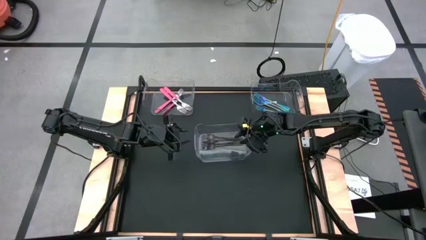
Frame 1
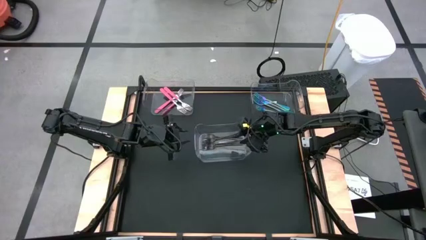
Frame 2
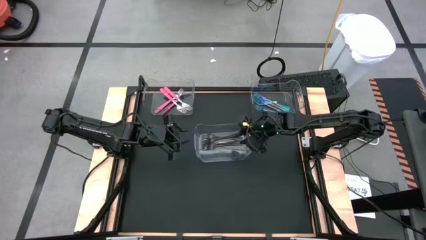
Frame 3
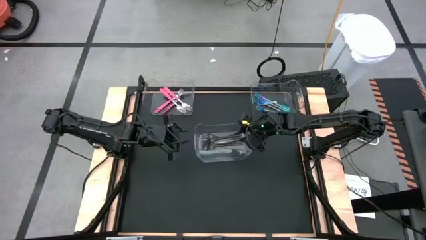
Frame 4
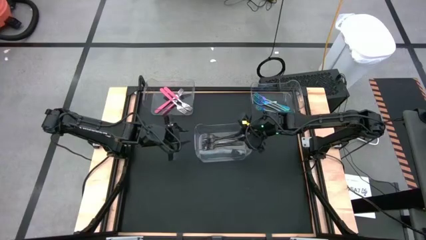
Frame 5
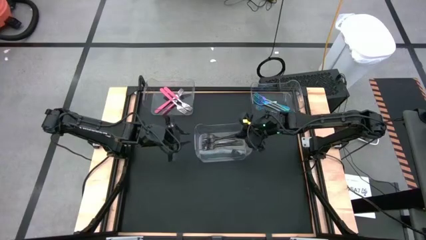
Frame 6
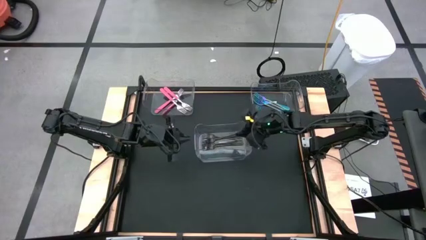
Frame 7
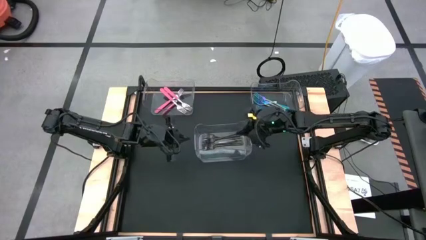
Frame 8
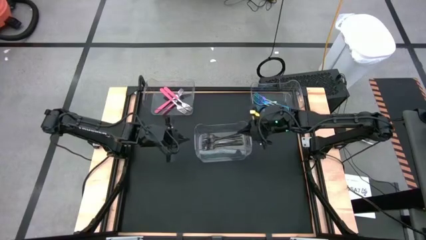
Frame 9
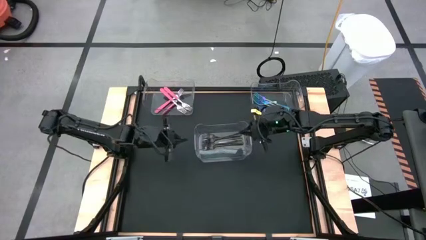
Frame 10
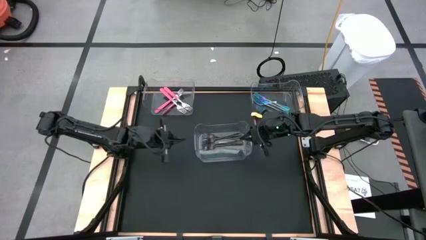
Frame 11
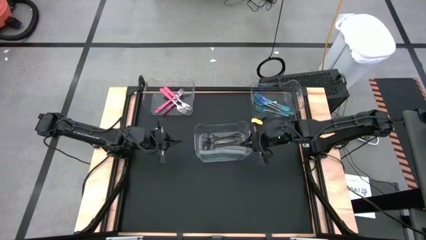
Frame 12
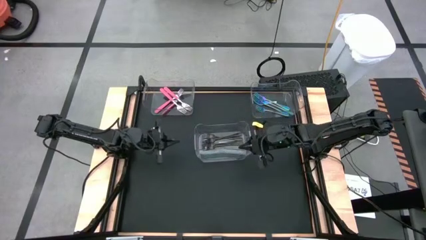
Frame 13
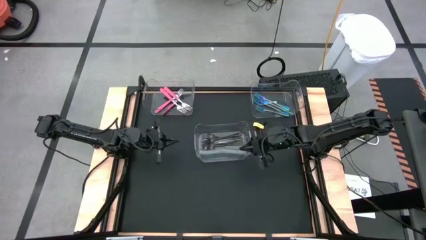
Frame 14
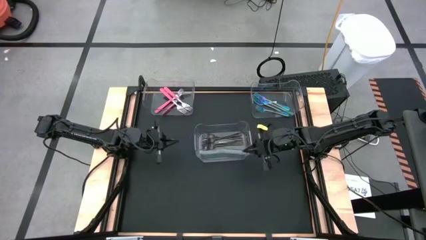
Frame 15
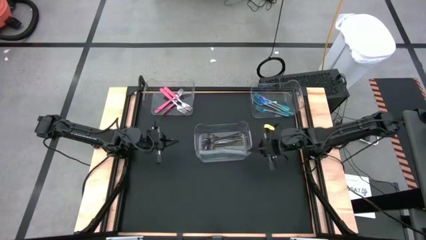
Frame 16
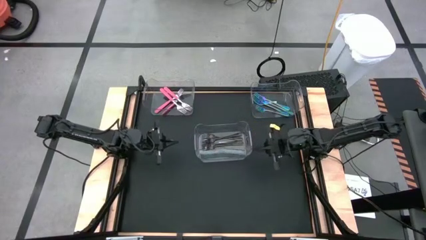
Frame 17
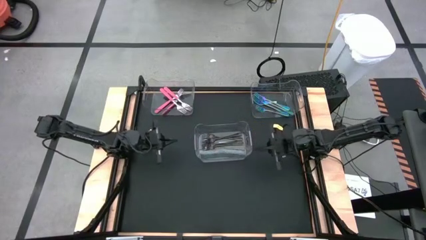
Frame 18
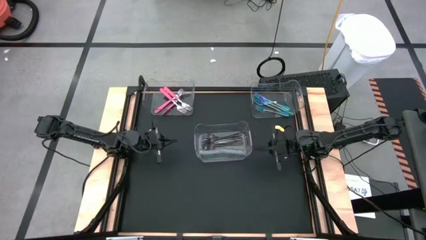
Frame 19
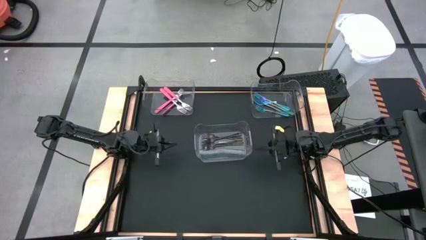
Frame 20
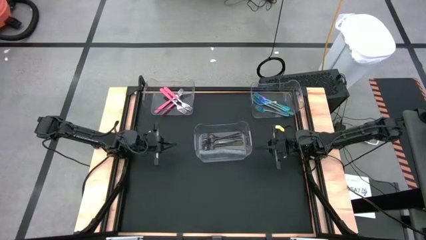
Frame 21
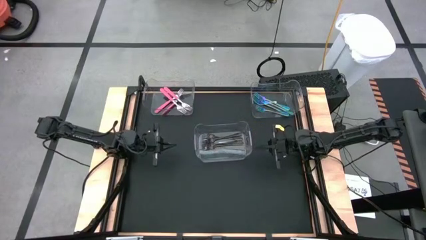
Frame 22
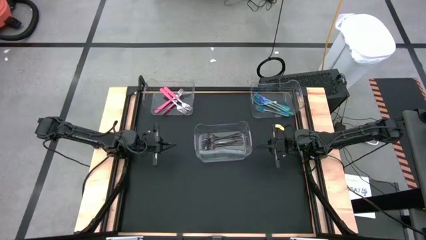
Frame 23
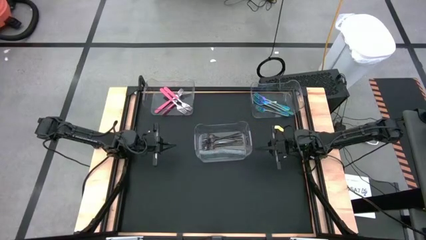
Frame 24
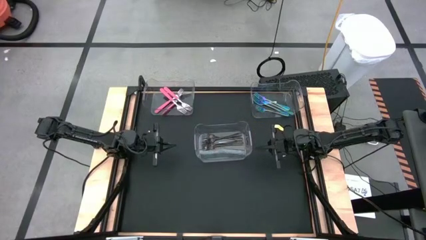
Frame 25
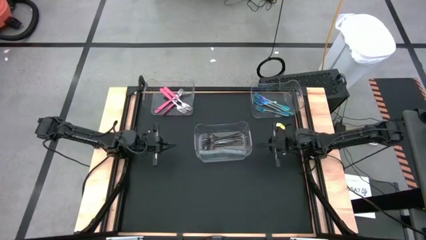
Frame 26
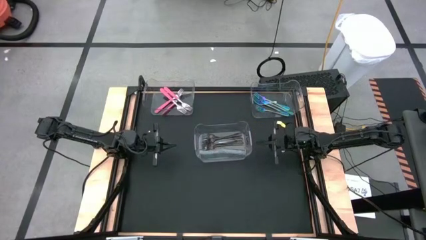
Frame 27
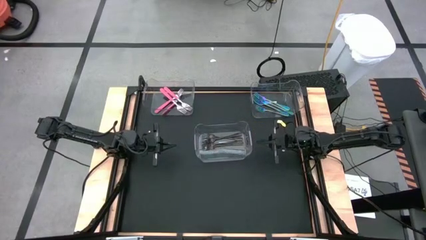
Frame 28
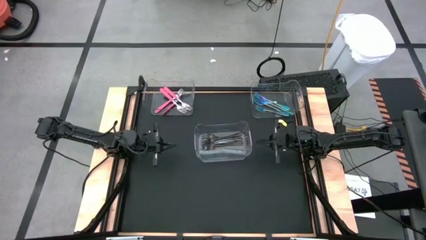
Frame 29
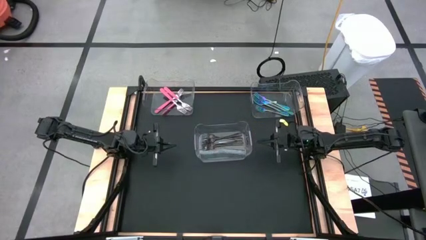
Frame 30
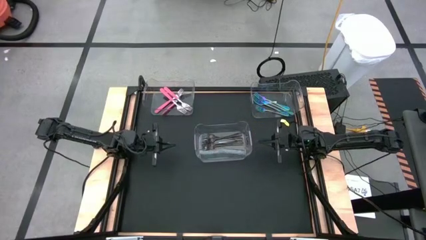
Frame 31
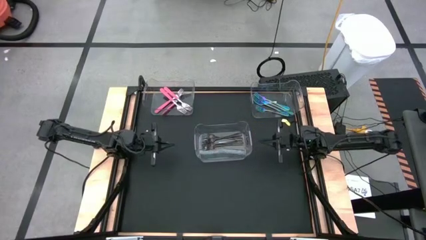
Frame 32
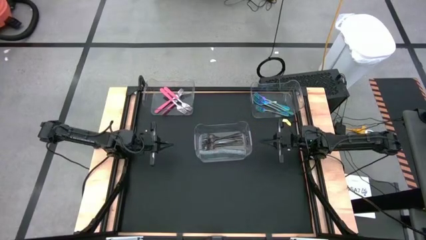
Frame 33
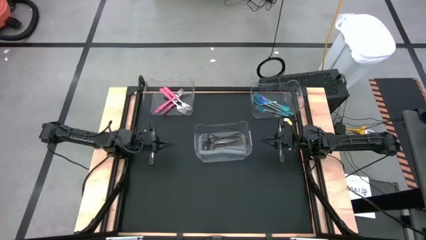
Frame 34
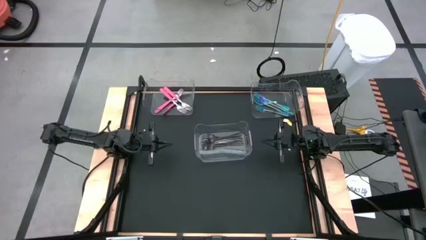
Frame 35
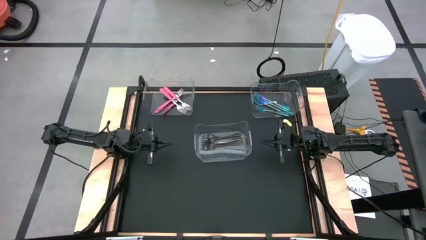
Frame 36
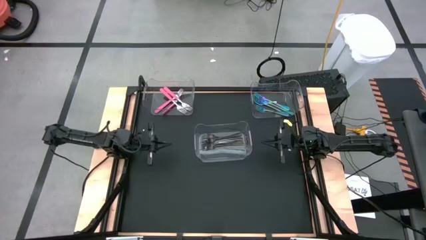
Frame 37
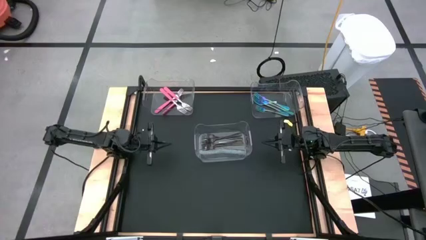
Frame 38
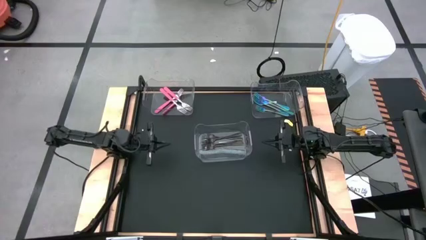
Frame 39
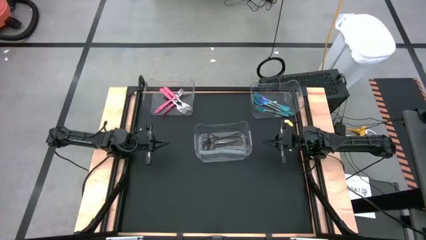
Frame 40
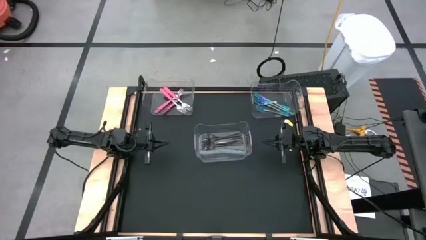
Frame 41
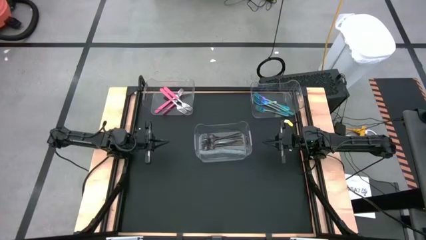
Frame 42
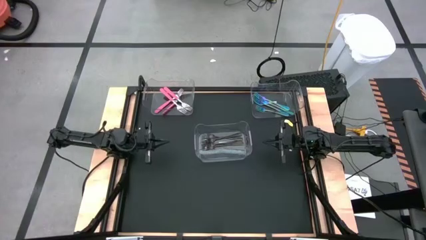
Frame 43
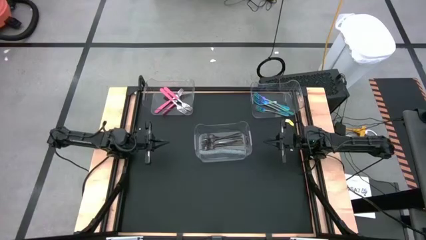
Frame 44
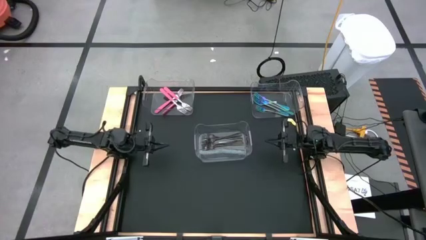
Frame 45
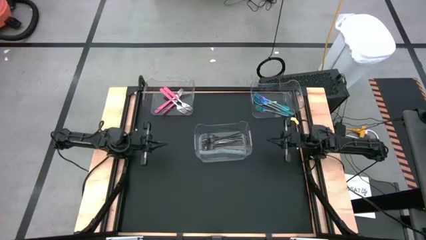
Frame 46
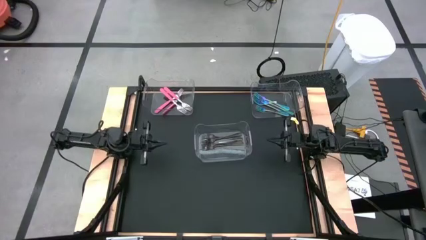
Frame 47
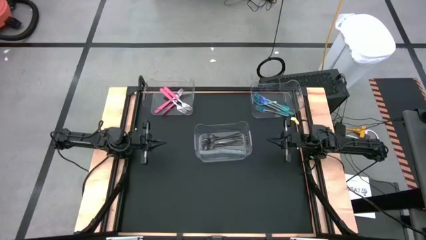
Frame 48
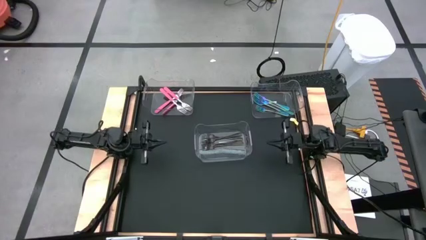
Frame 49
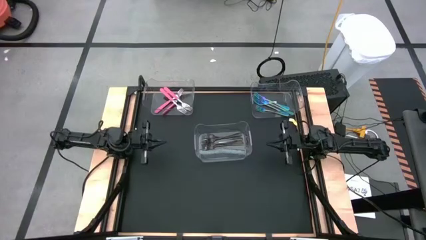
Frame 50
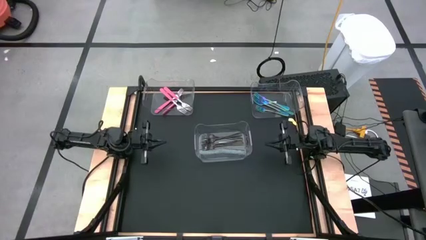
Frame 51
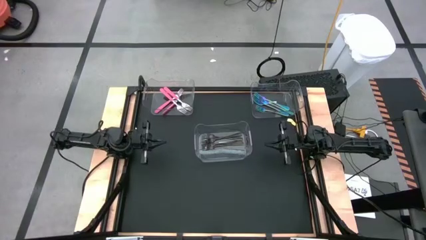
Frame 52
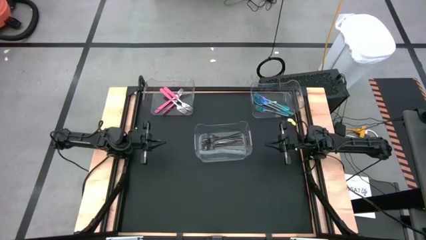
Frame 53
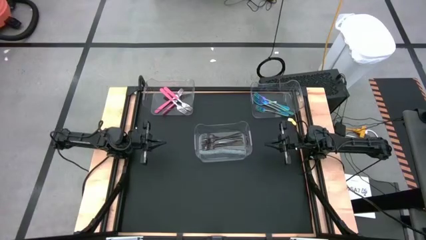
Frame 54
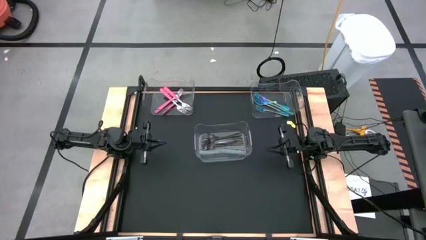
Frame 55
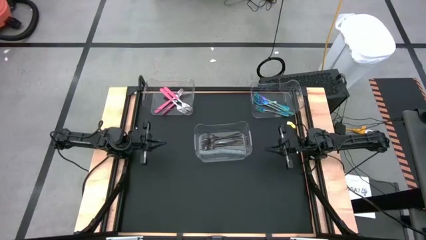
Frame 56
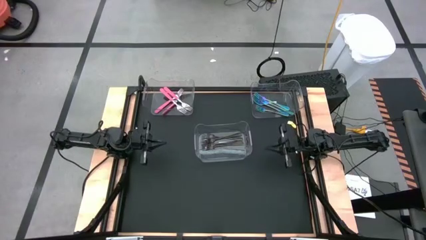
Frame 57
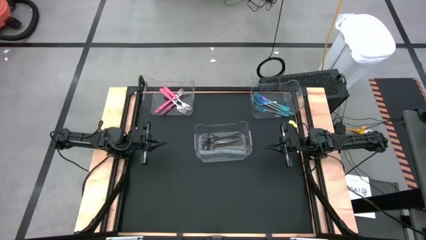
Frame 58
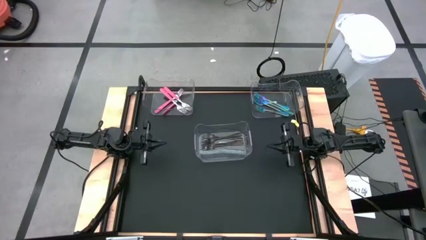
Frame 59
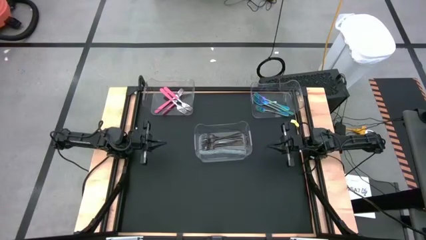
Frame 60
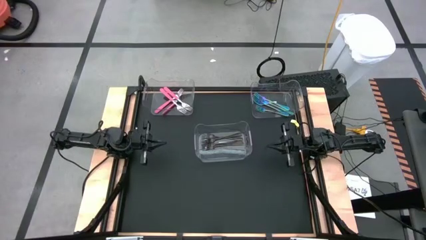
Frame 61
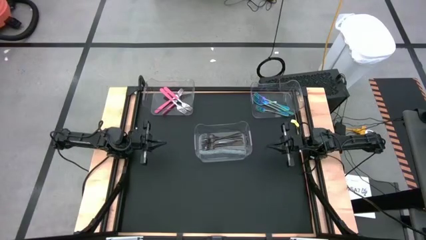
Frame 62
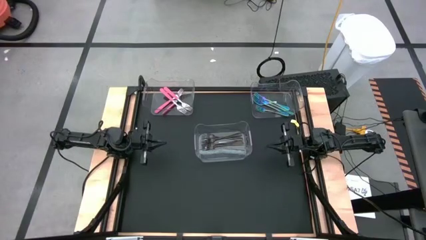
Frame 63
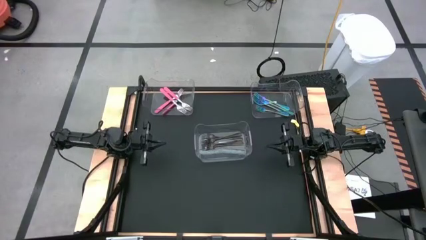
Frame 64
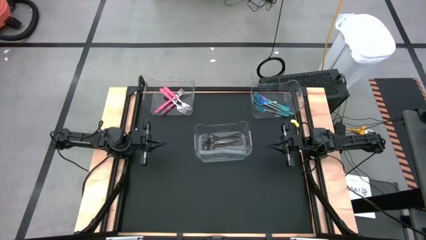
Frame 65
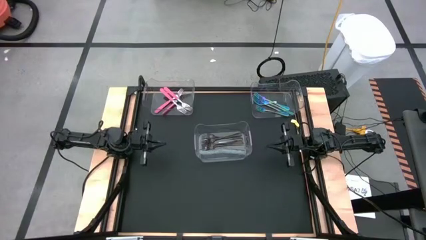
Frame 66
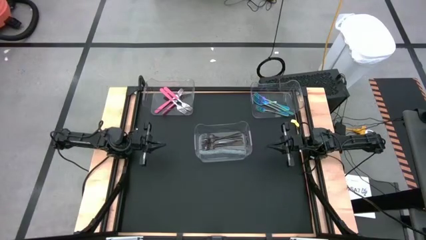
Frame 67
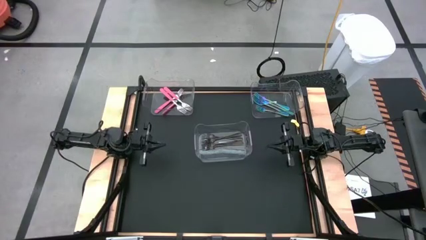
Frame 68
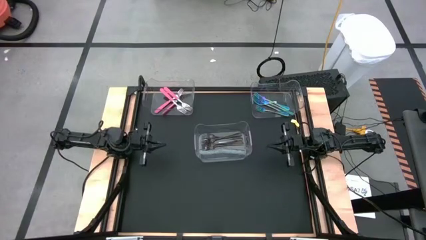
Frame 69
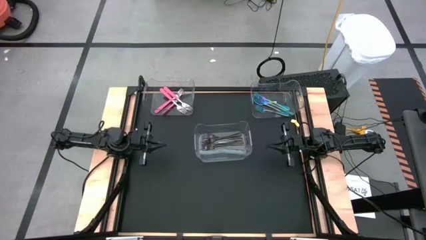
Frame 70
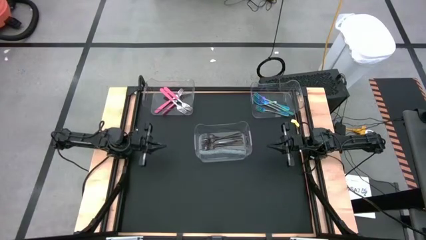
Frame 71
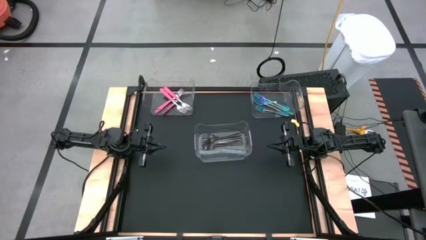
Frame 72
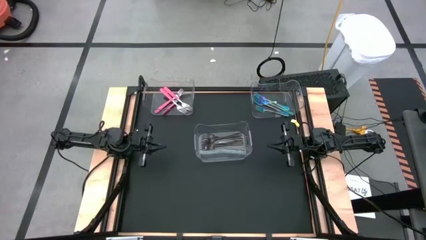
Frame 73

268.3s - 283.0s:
Task: Sort silverware by color (type)
Return to Home Position

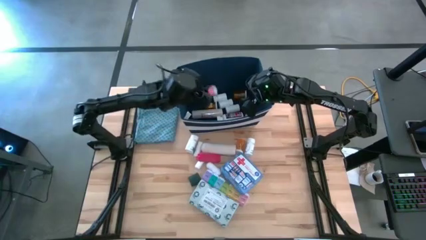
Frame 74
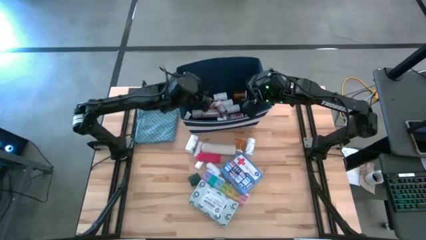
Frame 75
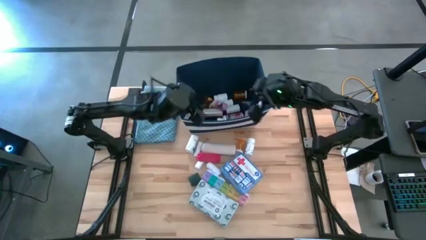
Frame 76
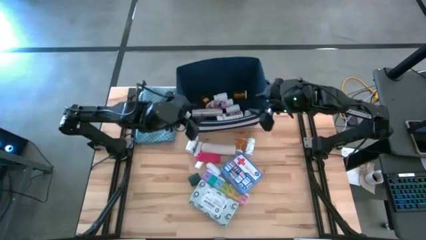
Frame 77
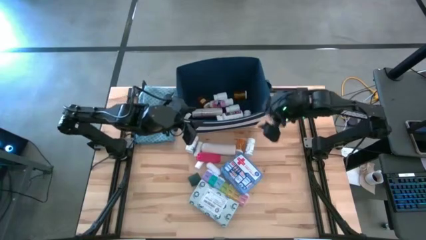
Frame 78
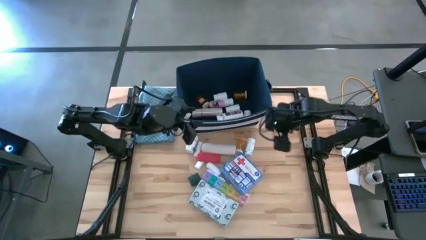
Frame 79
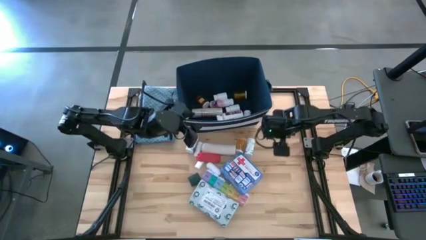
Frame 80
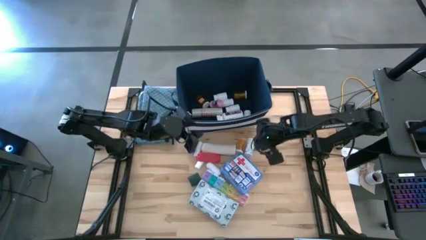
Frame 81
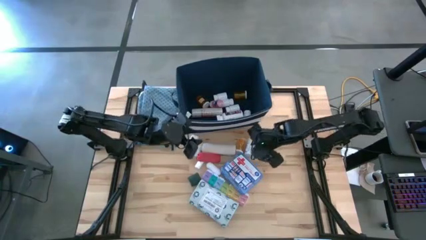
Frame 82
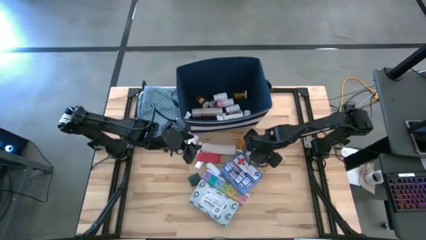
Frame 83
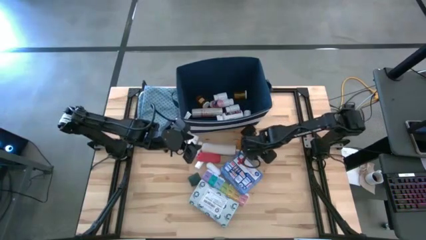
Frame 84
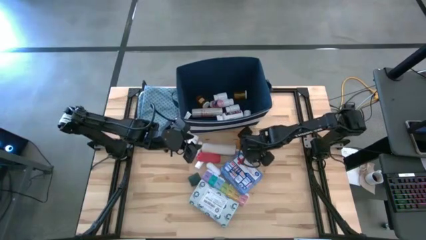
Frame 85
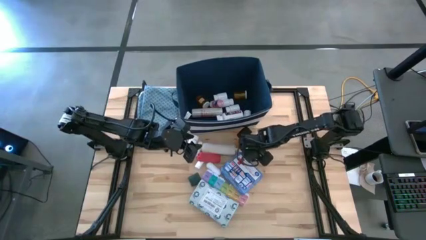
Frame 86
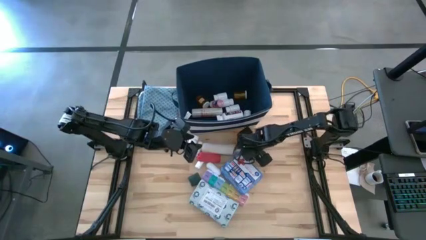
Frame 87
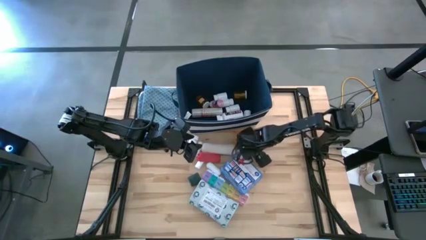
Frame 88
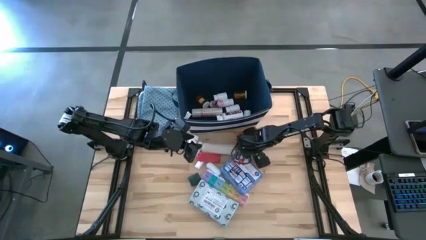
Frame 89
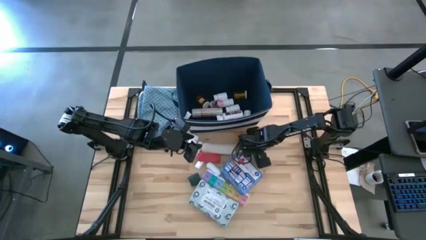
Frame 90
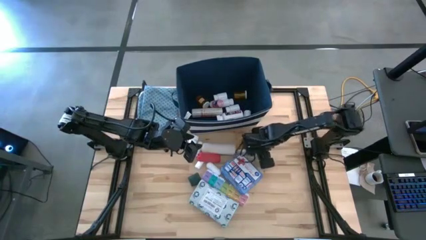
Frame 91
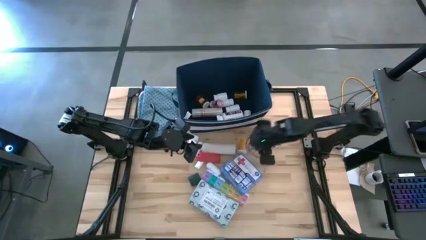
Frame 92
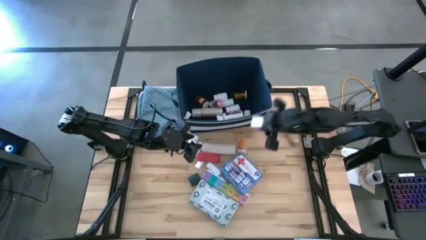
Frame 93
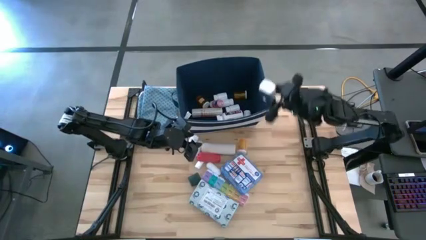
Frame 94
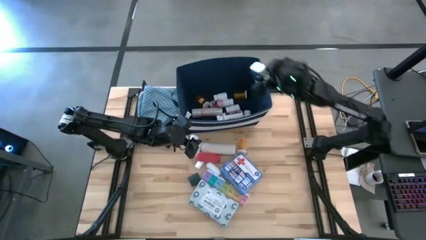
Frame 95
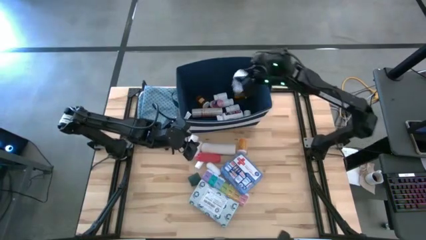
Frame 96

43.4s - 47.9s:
Task: Pick & place medical supplies in basket/bin
Put the blue pill bottle into the blue bin
